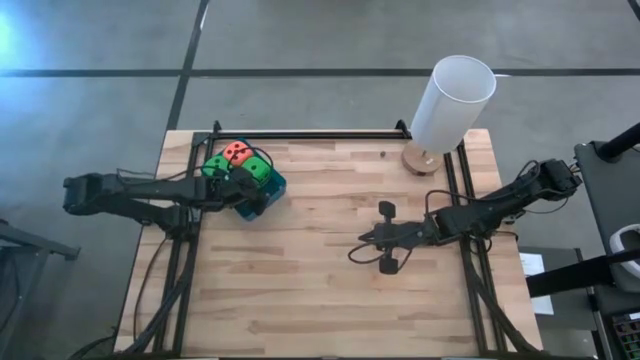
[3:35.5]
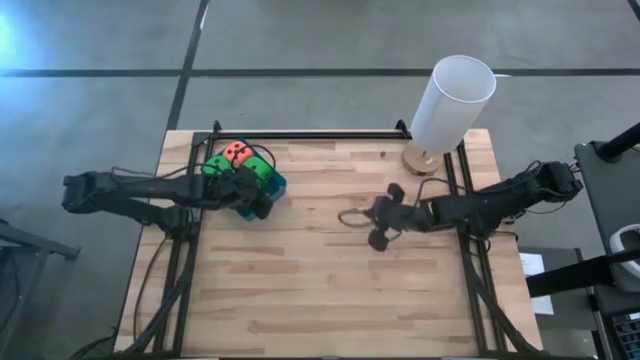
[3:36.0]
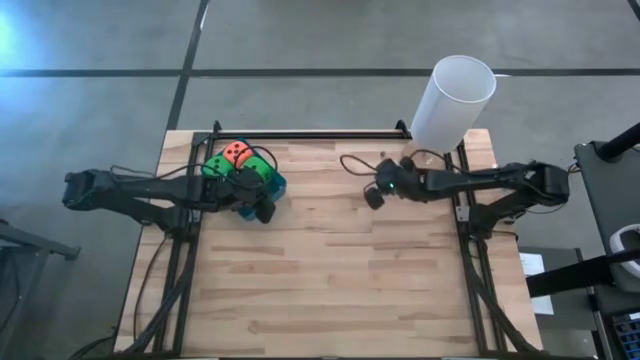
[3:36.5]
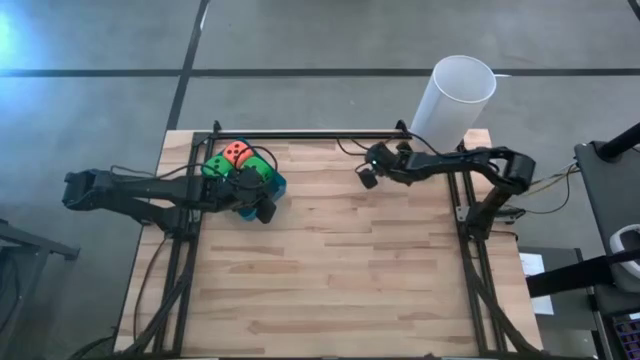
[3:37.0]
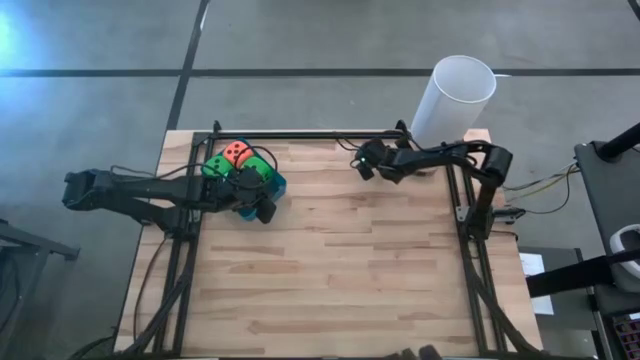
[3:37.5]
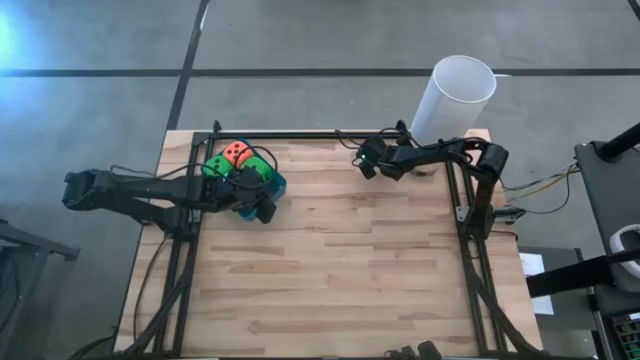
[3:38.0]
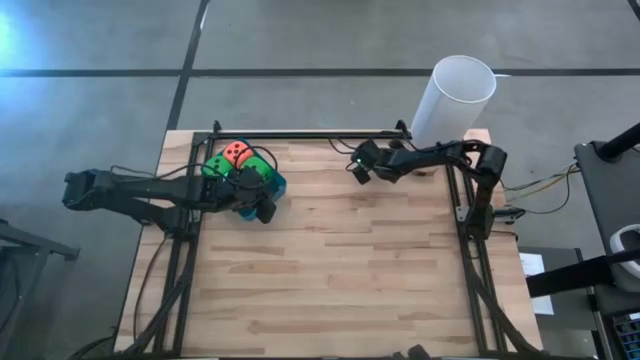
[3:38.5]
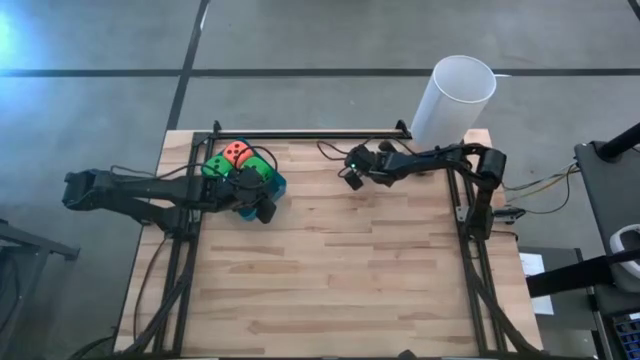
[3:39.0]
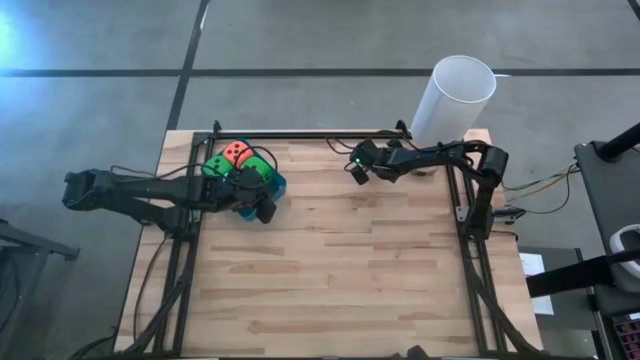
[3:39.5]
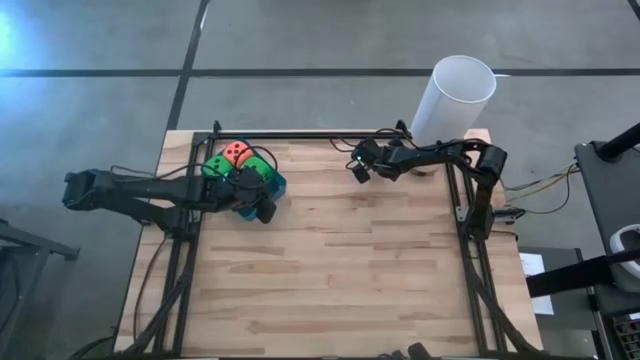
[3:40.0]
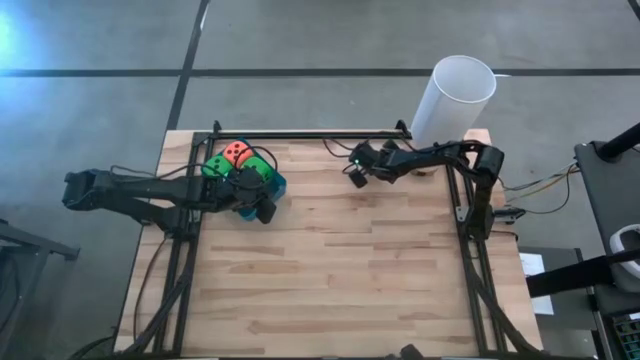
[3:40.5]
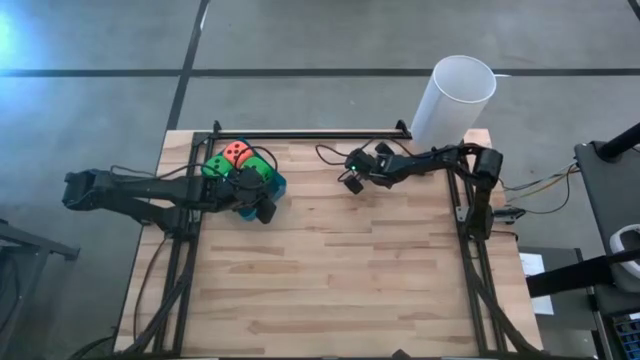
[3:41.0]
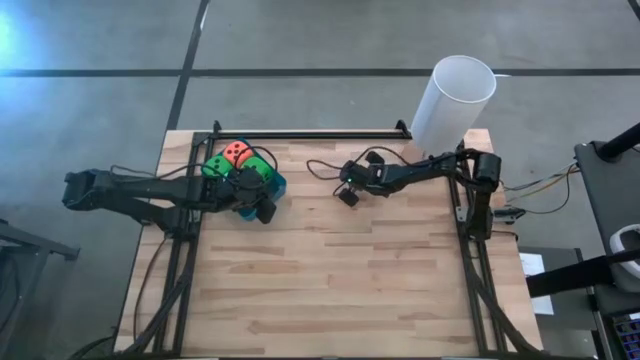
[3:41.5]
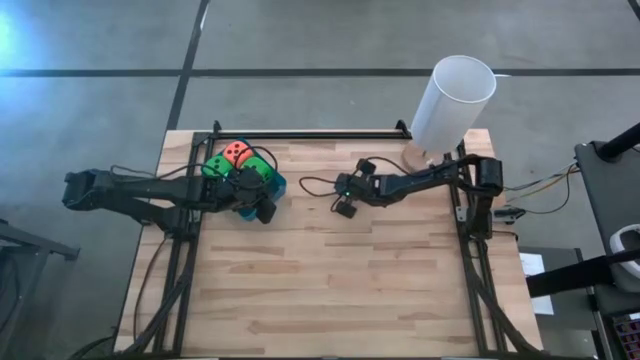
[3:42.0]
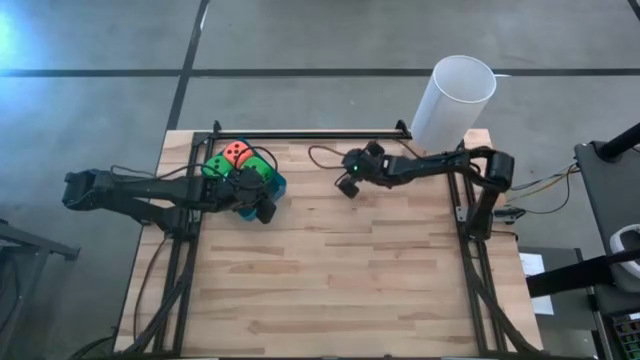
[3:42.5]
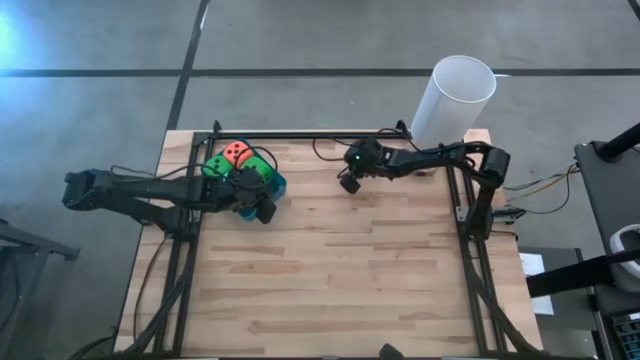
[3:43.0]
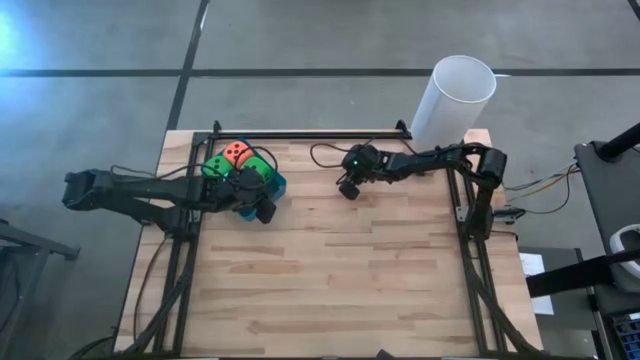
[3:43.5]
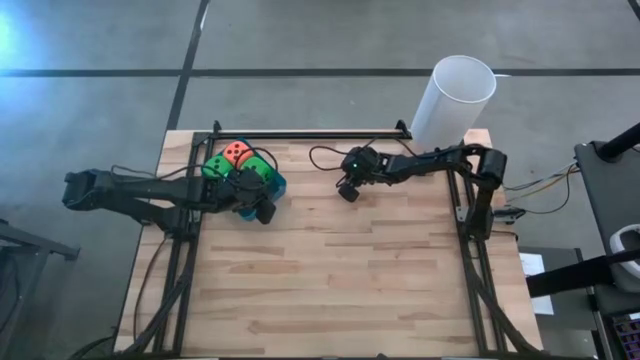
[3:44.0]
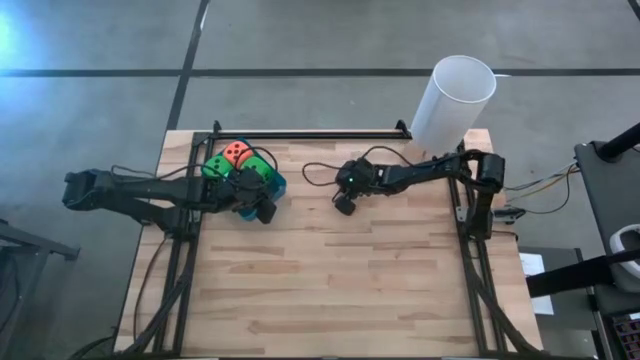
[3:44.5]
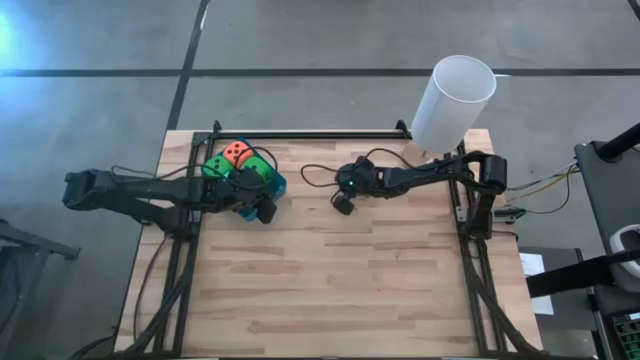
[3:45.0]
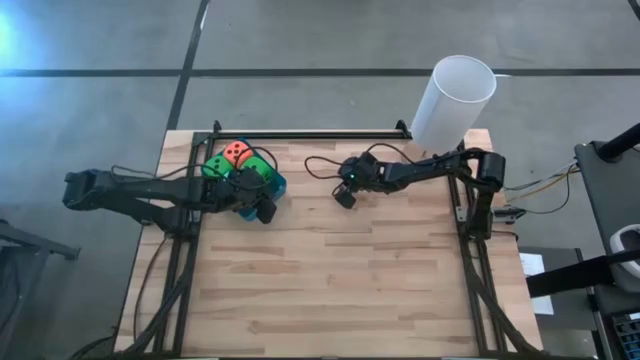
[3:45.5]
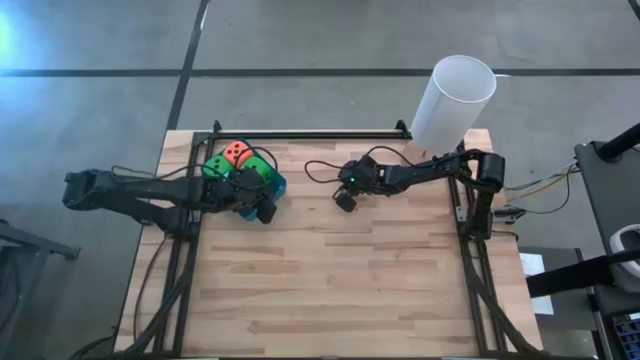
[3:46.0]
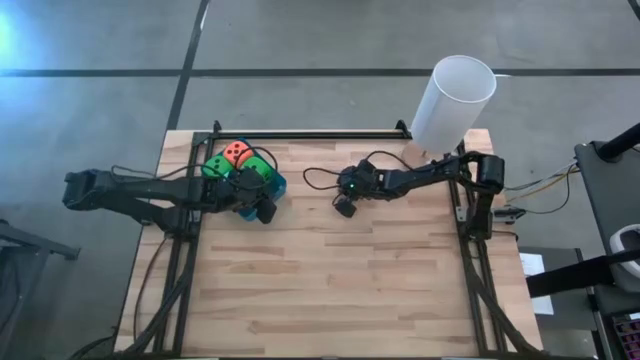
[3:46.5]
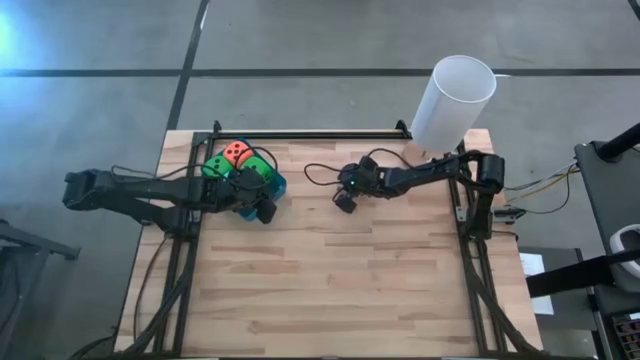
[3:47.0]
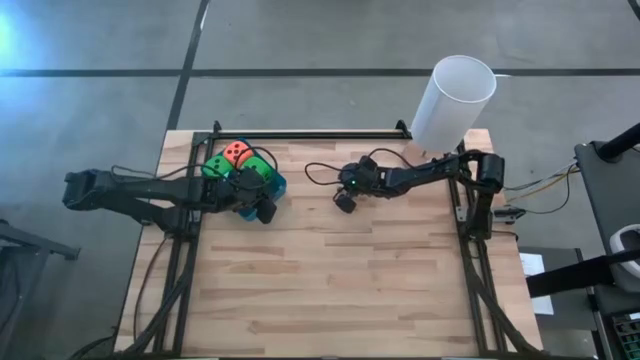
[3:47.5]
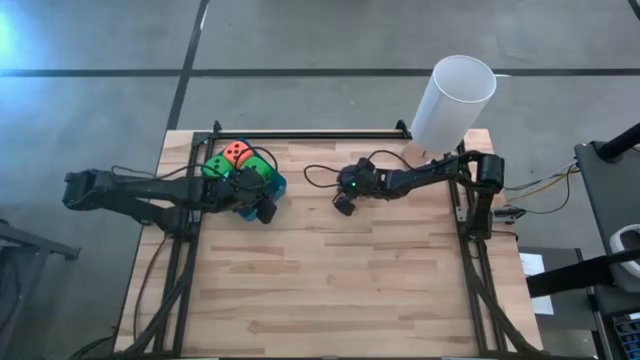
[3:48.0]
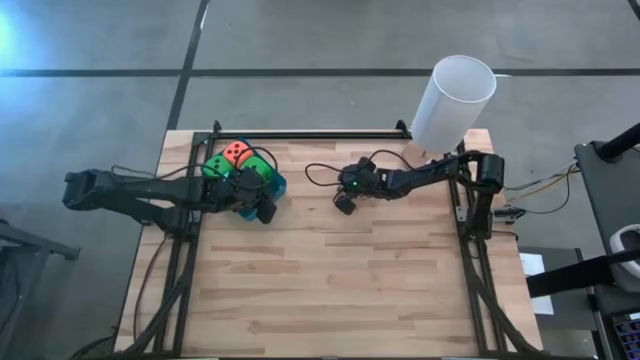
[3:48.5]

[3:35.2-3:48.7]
Task: Pick & Place Dice
Put the small black dice into the blue bin

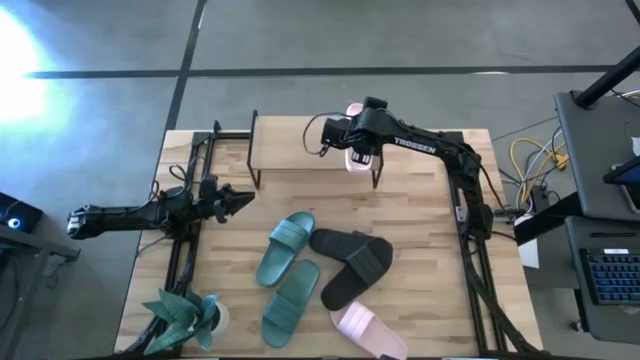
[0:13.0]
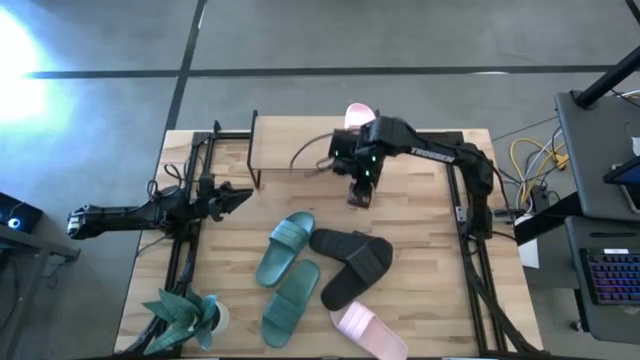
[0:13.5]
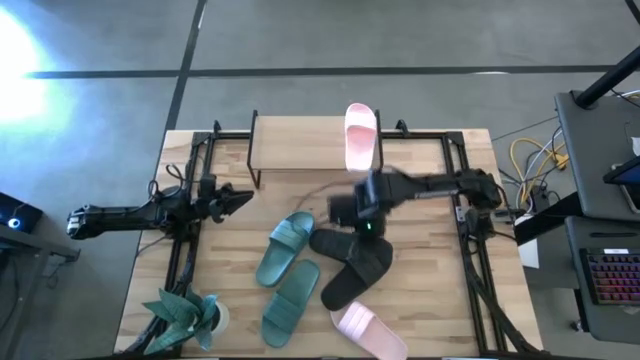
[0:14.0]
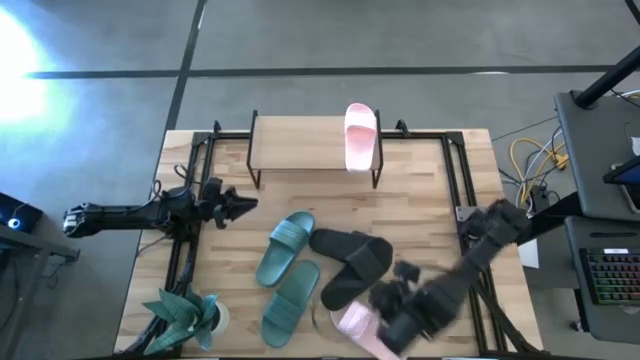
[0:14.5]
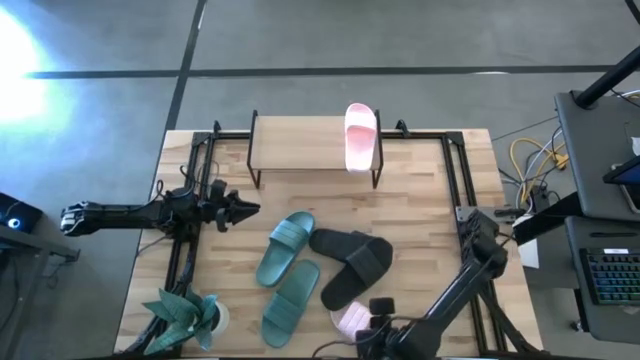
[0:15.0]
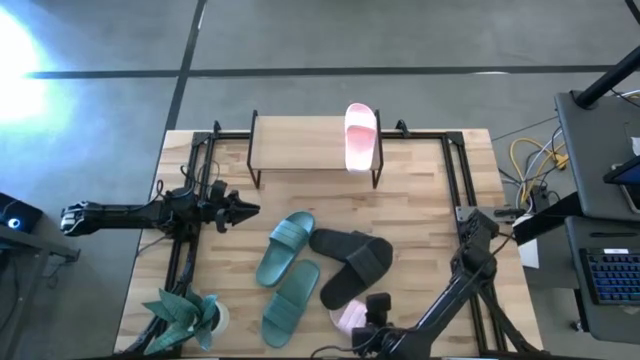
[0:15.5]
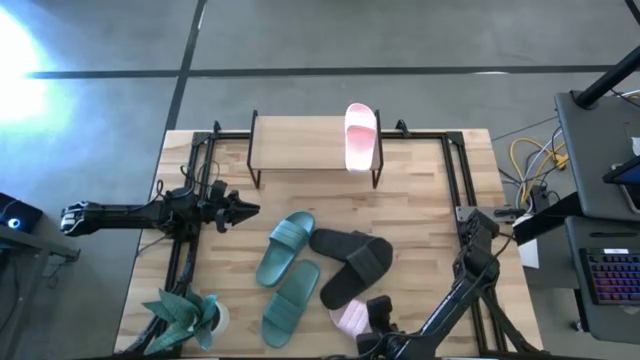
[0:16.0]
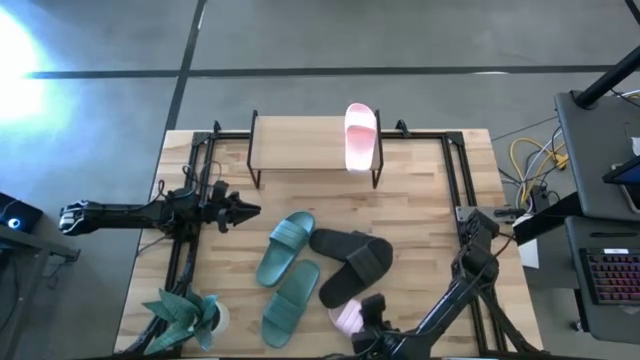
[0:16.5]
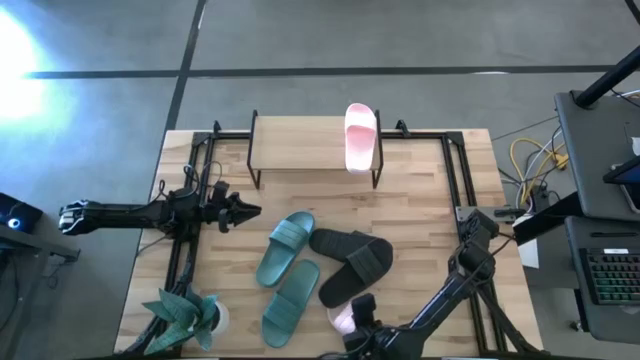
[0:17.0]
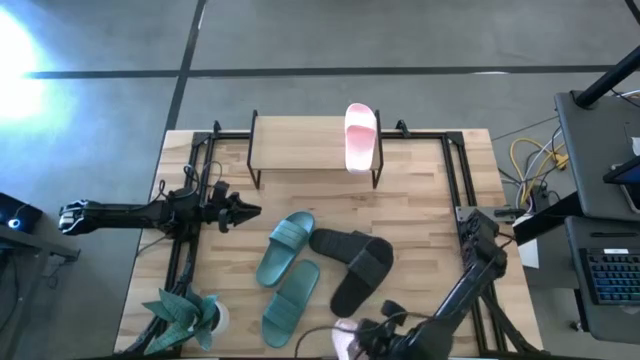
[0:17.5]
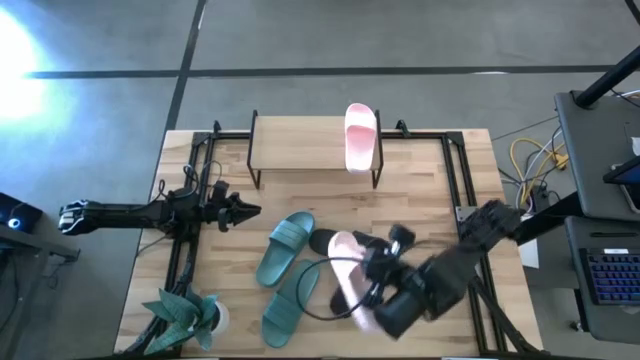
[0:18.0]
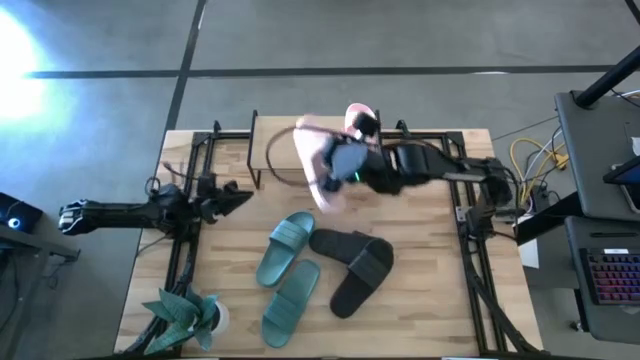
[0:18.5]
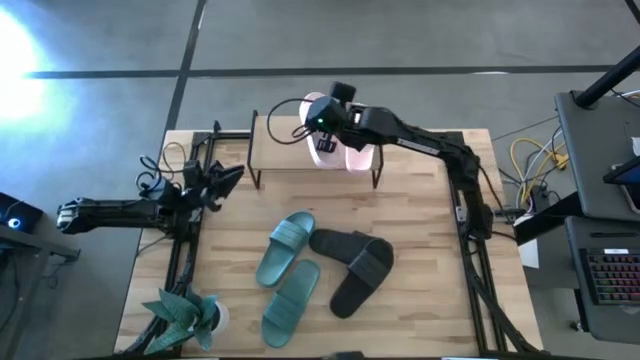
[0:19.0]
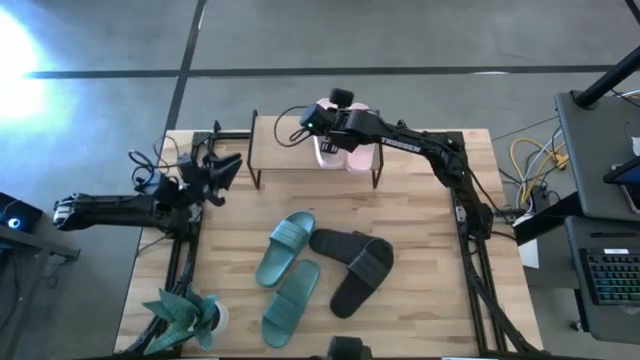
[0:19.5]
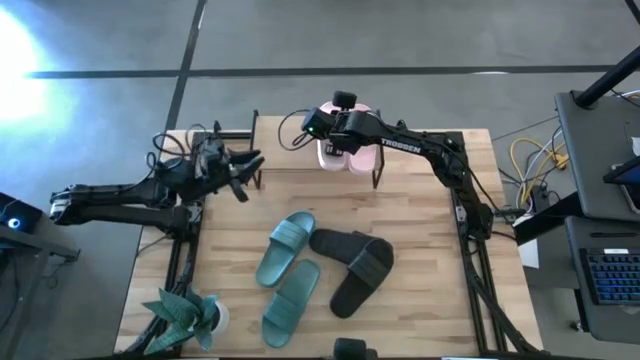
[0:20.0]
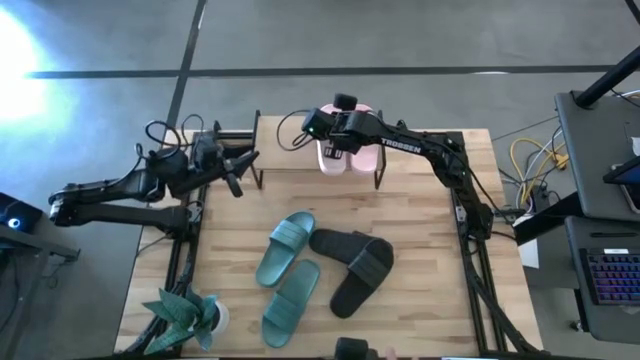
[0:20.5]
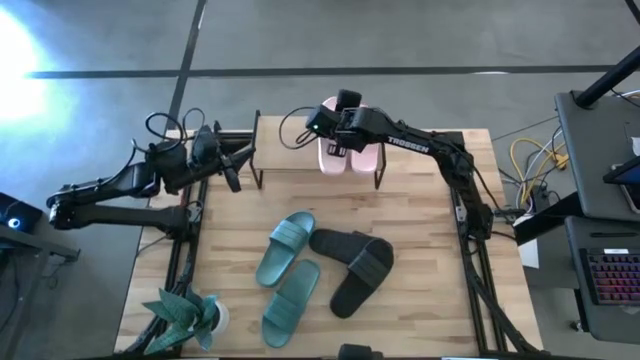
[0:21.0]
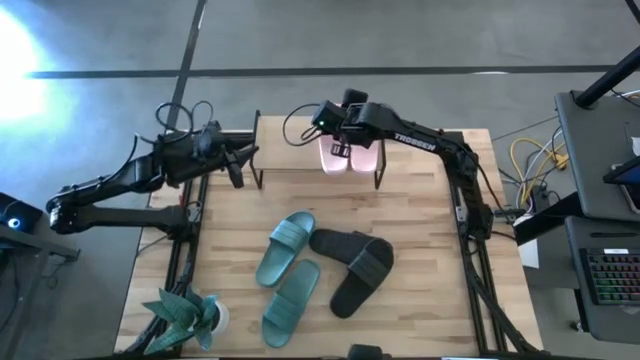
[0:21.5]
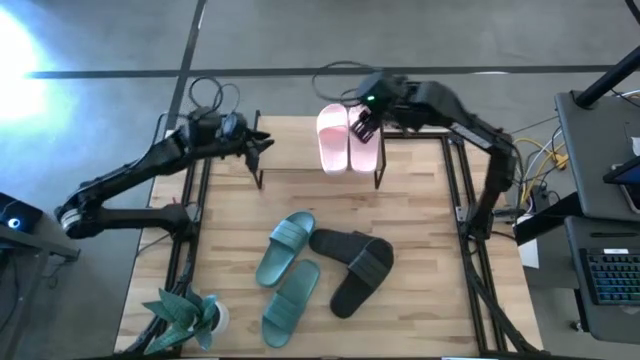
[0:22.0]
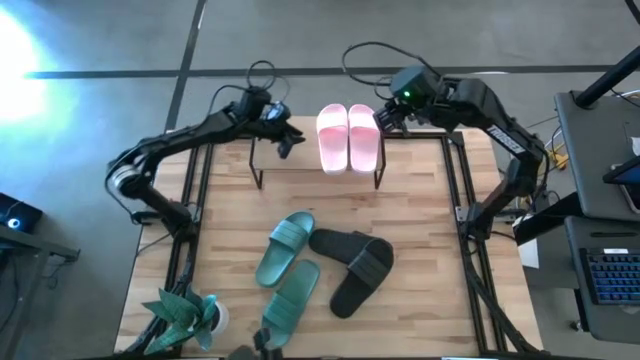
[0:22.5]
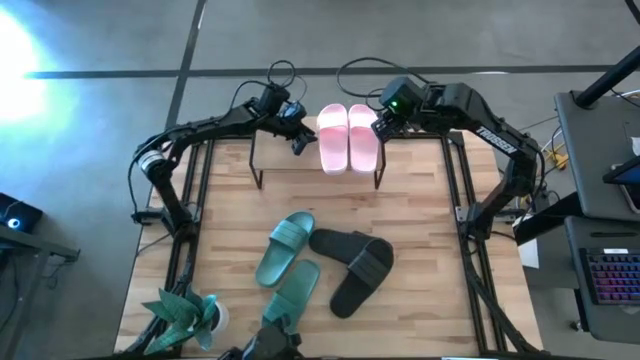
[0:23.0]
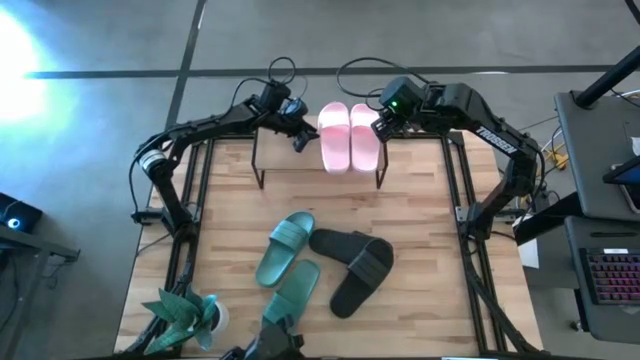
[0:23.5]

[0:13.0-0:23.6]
Task: Pick and place slides into the shelf
Put the pink slipper on the shelf
